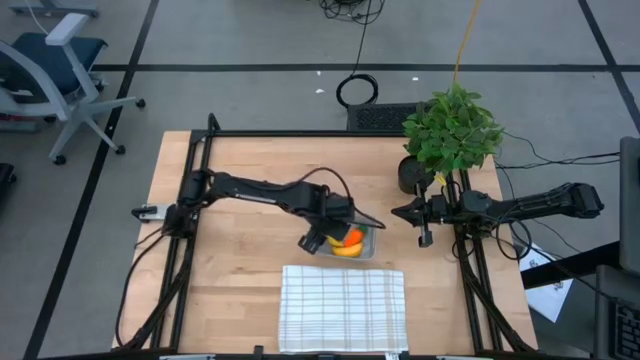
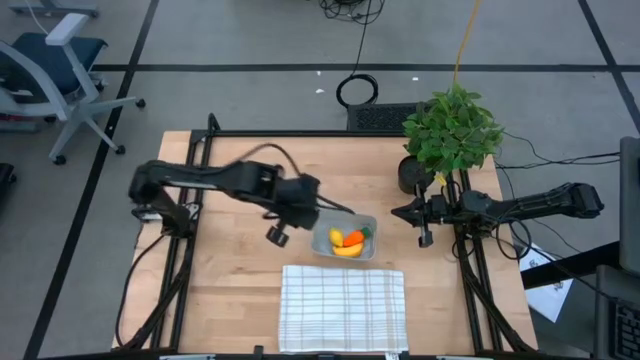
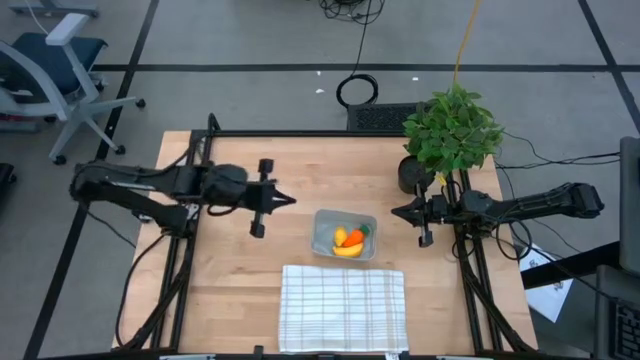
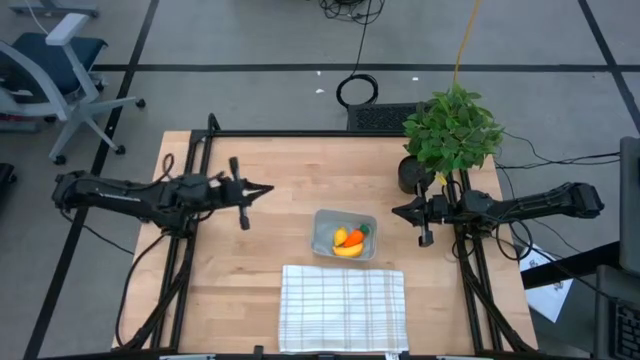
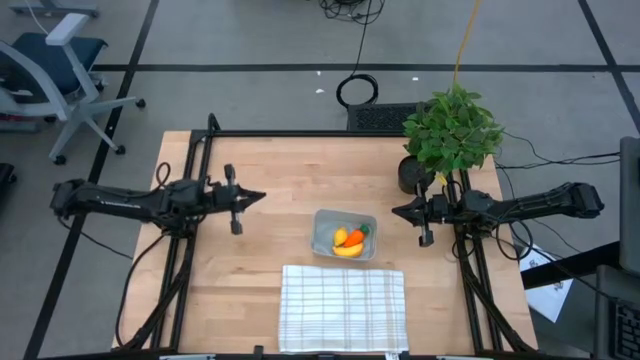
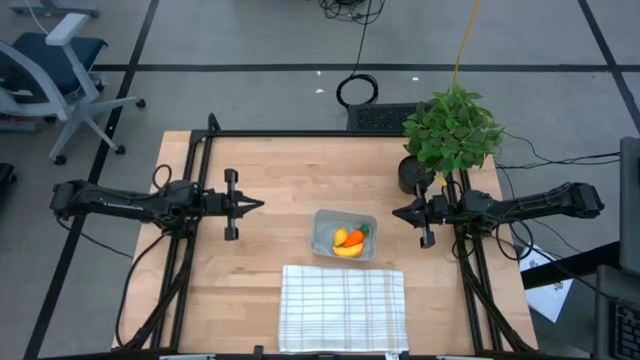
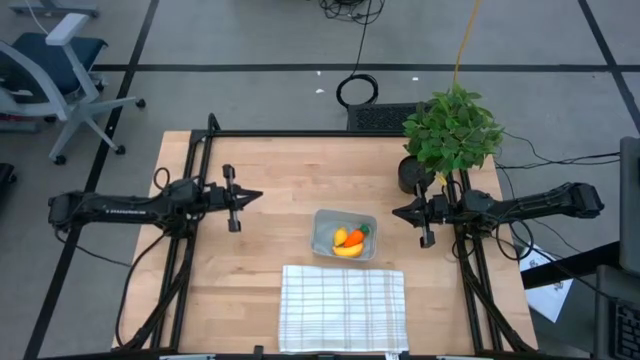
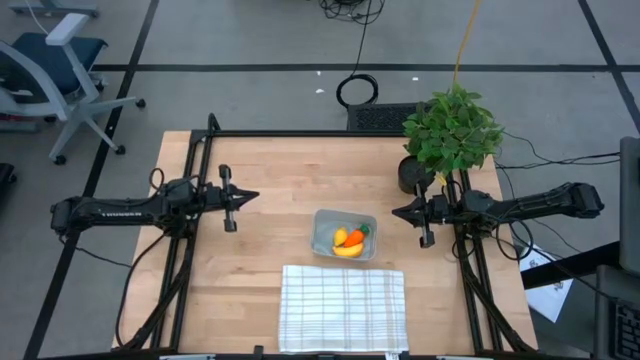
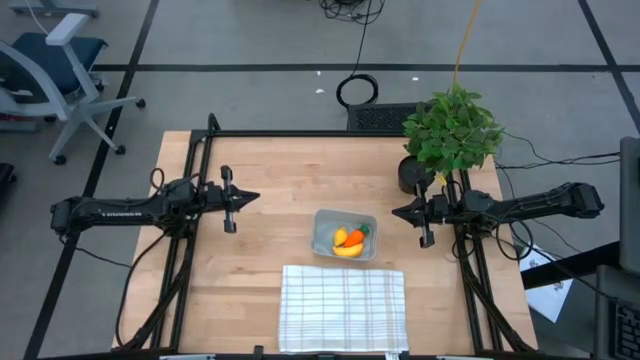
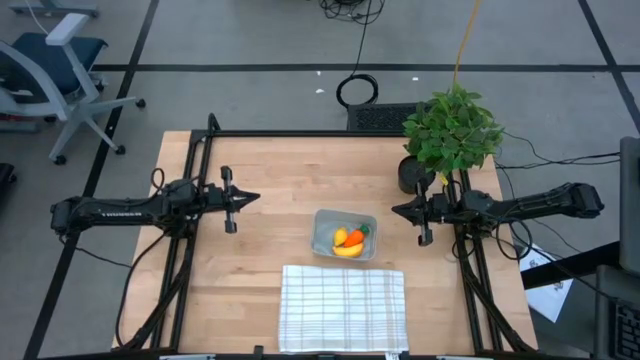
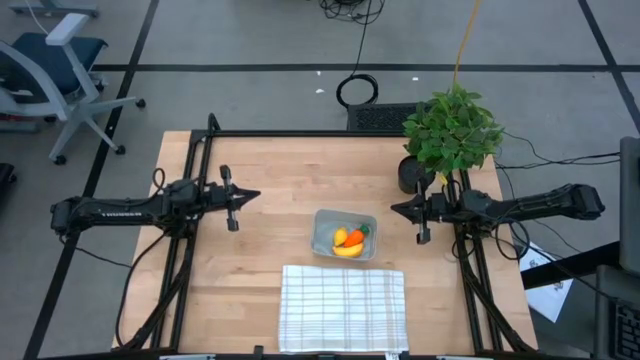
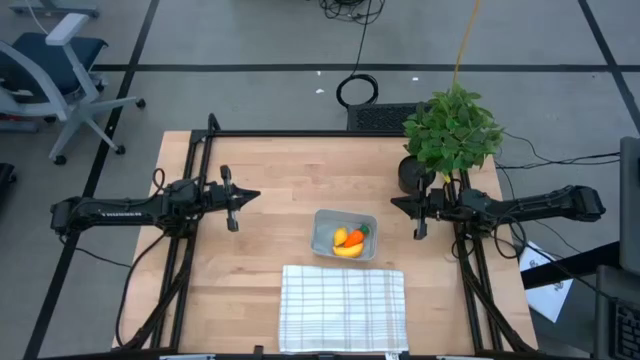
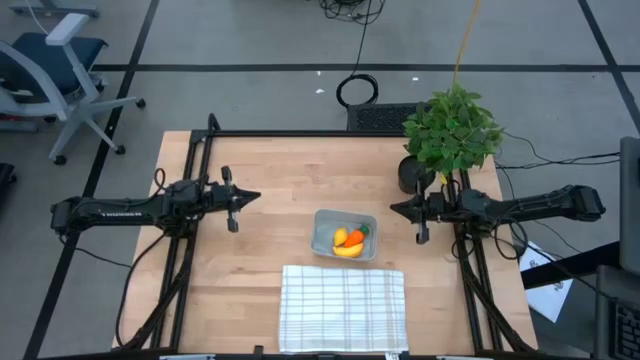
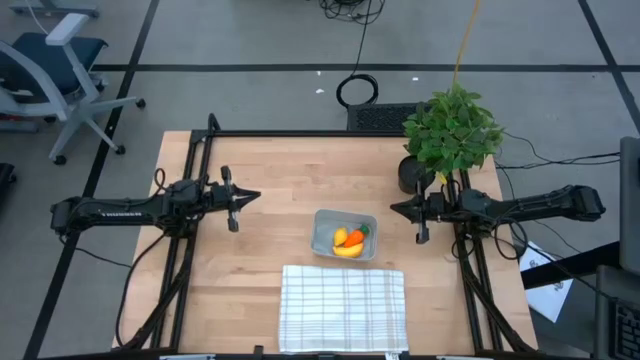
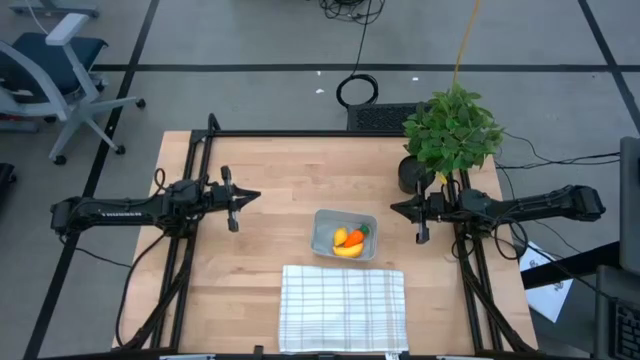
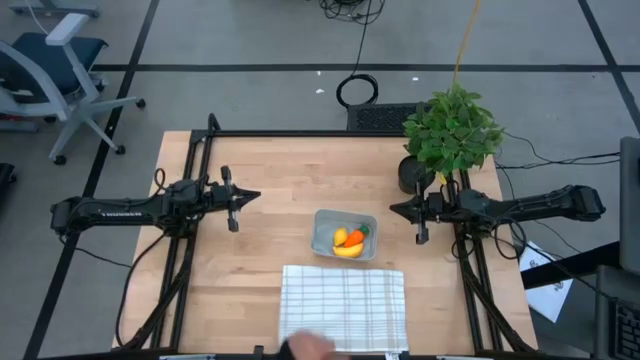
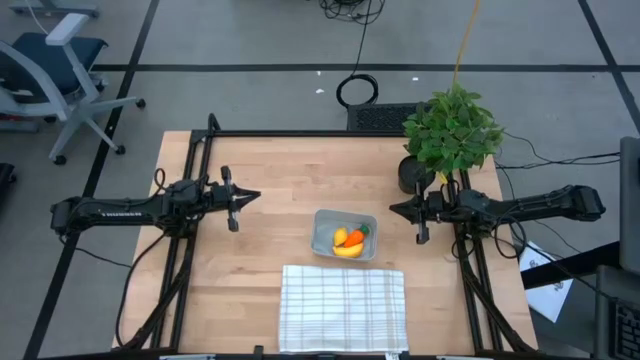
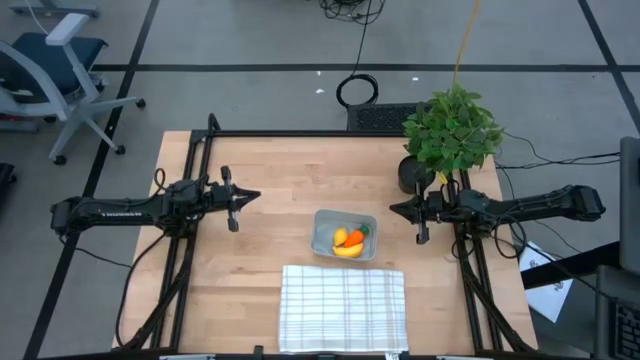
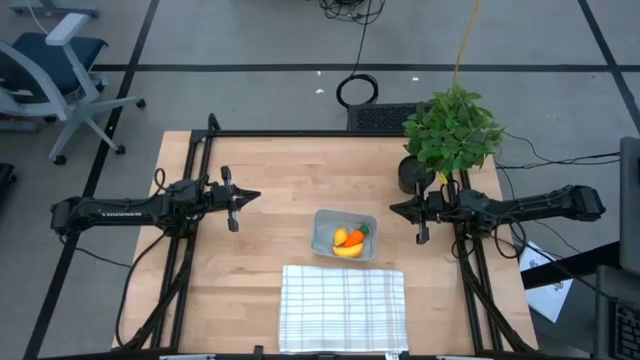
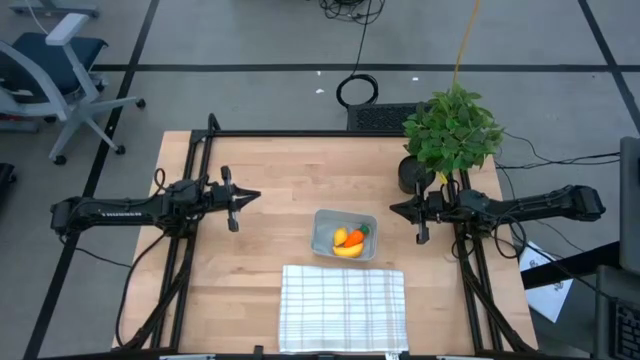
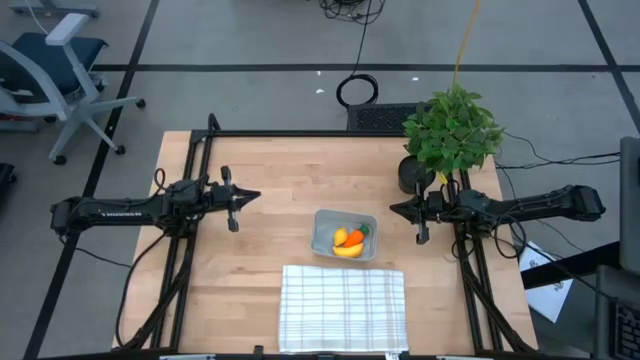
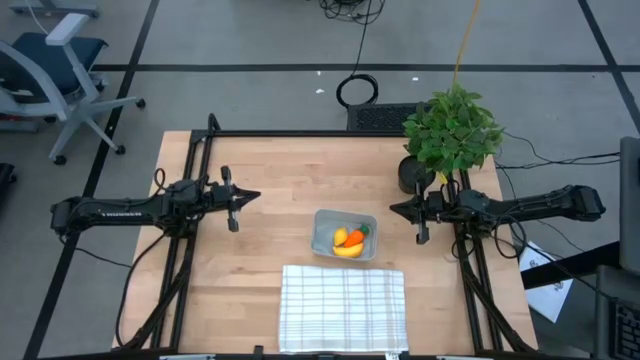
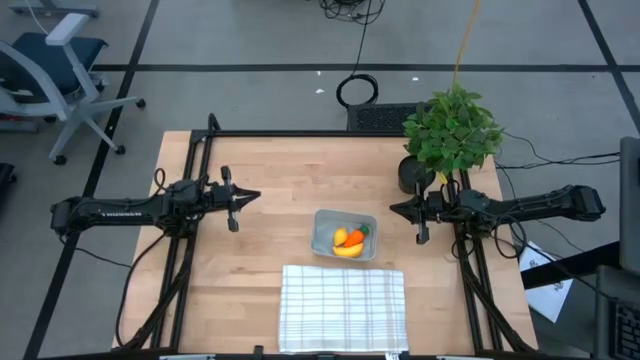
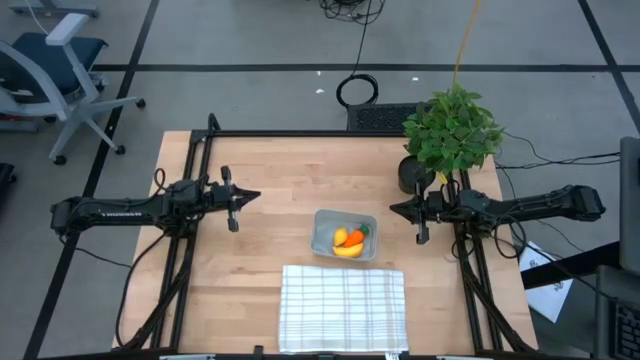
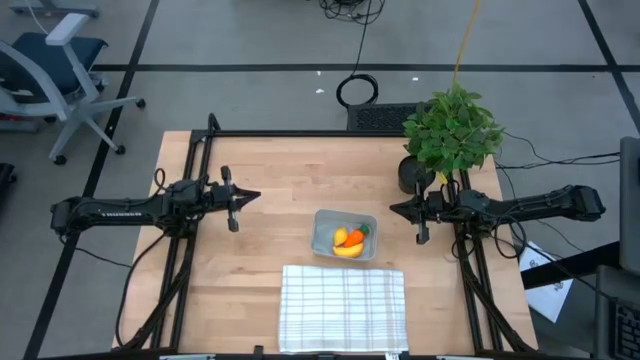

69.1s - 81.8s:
Task: Pick and placing Produce into tupperware
Return to Home Position

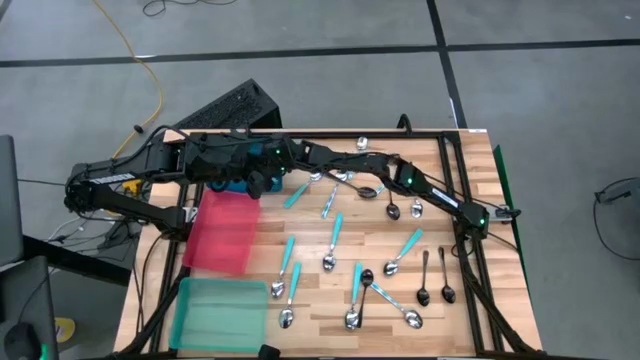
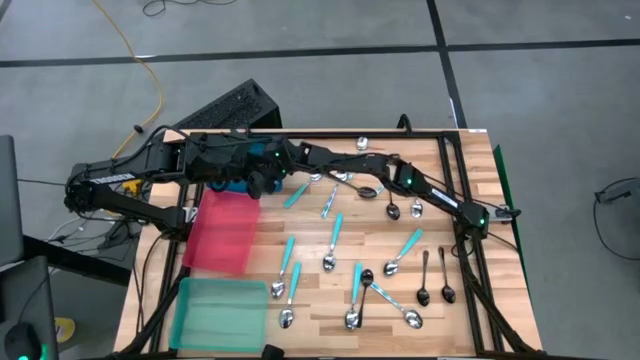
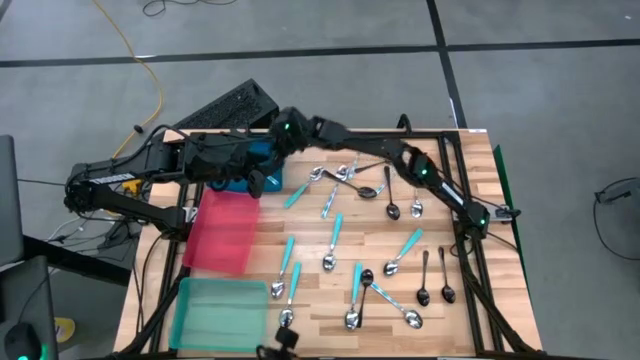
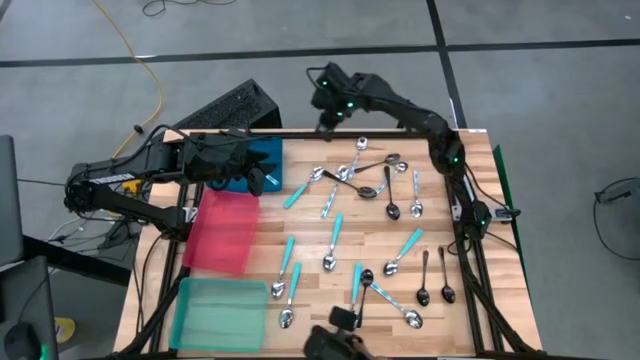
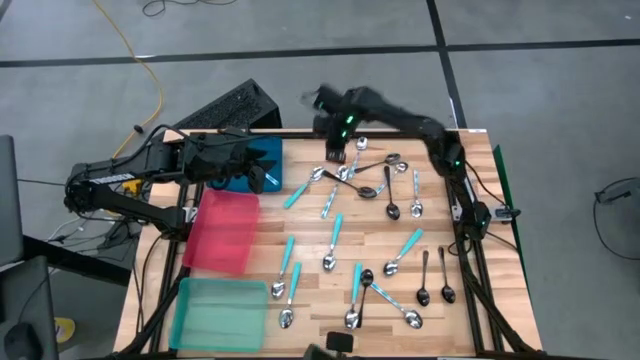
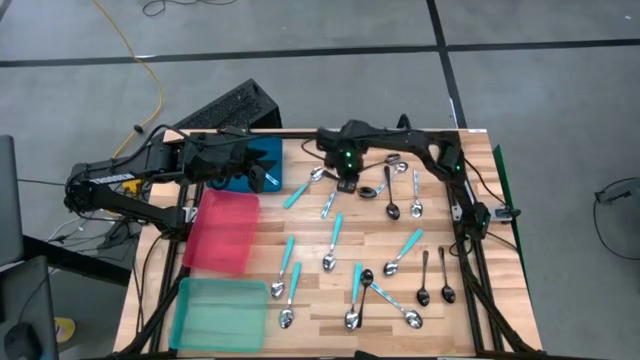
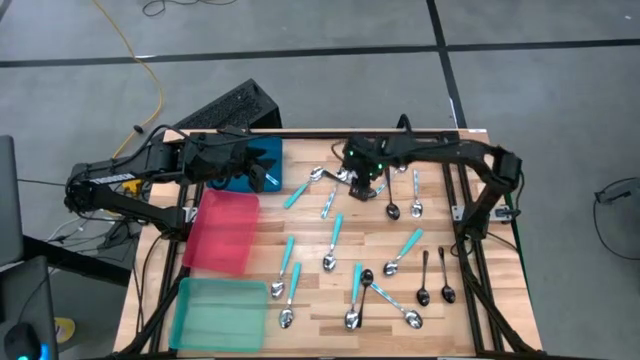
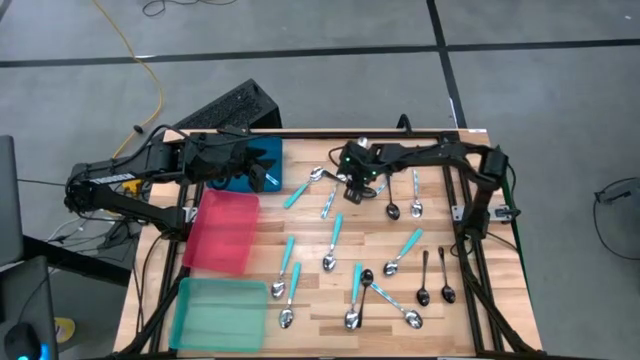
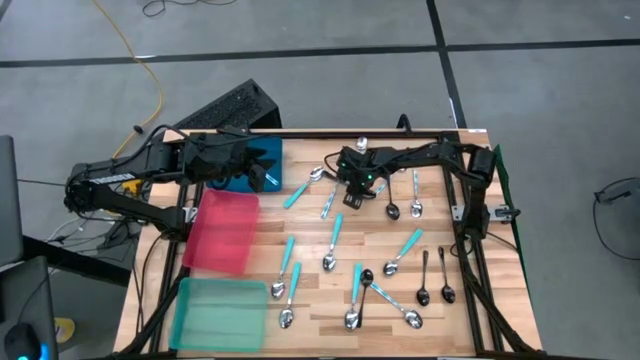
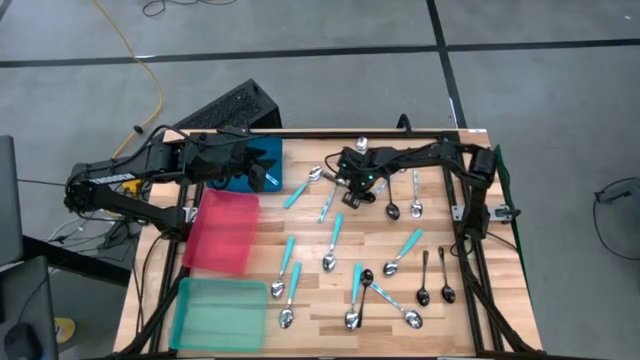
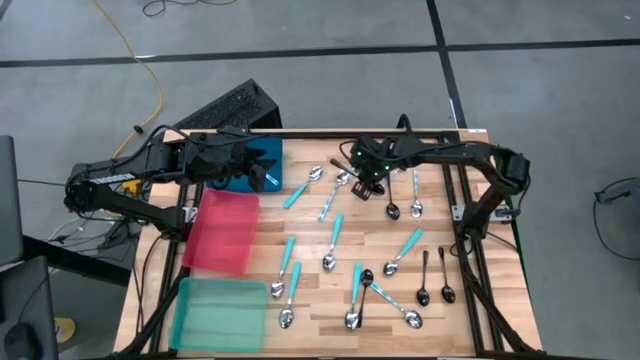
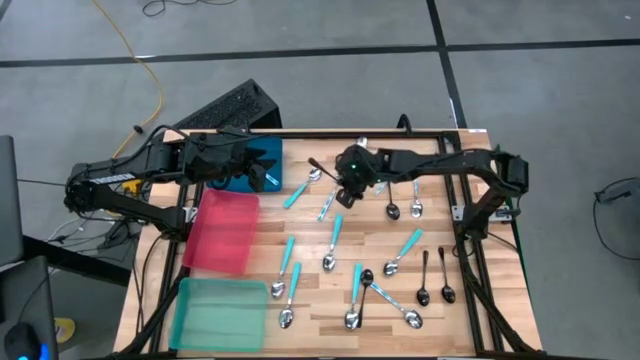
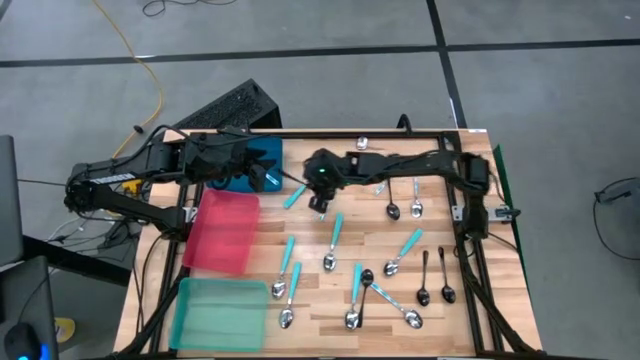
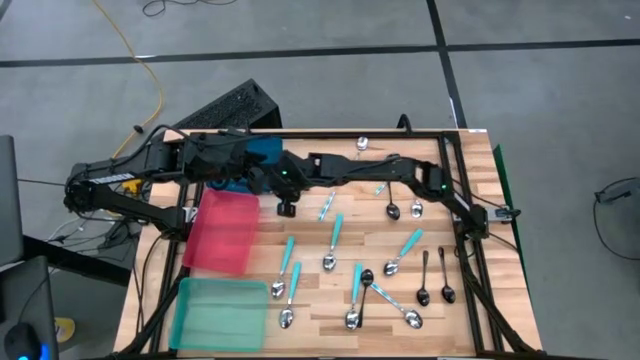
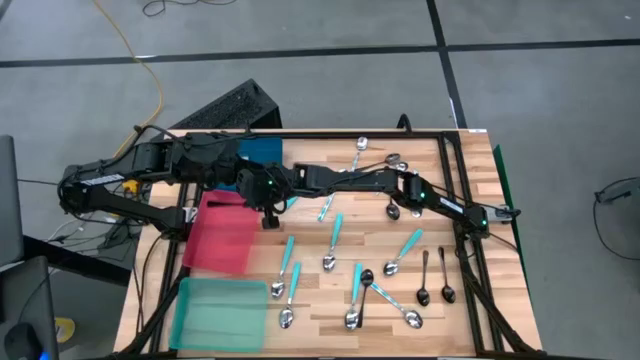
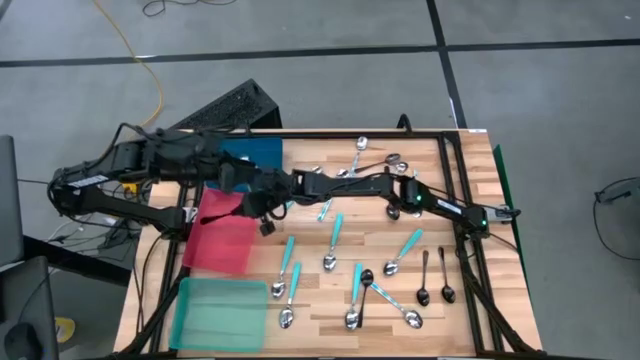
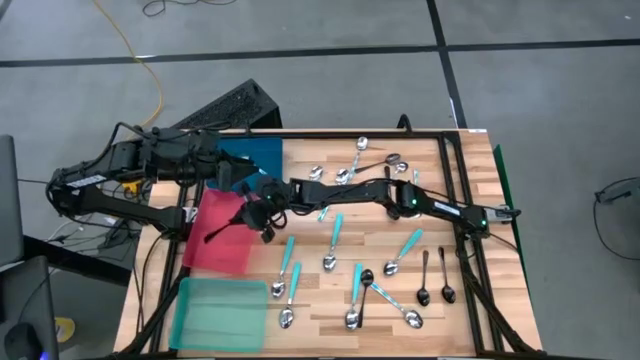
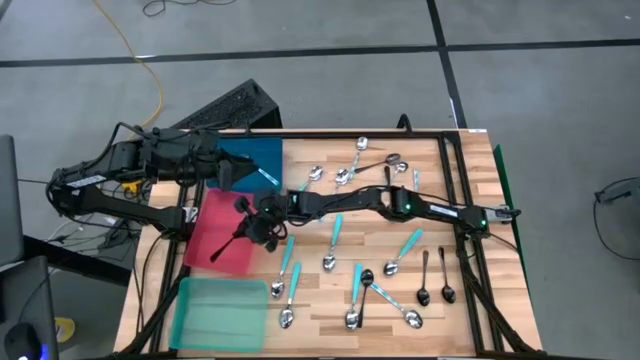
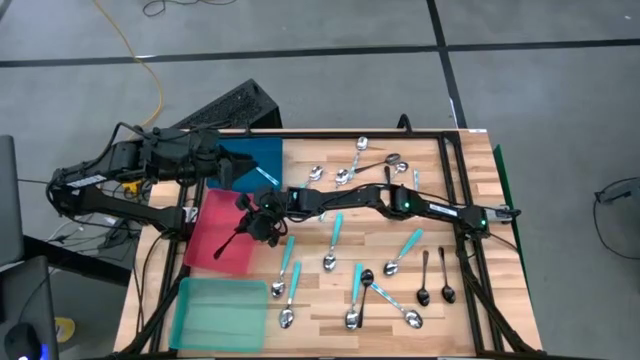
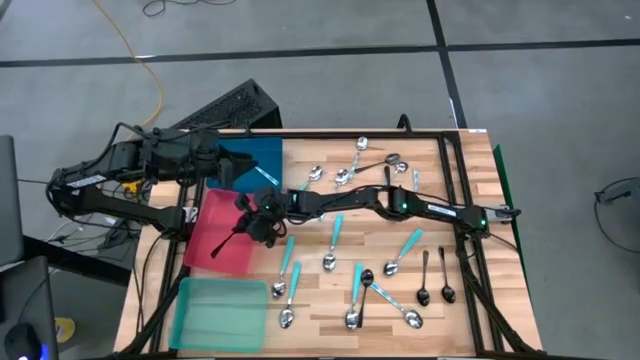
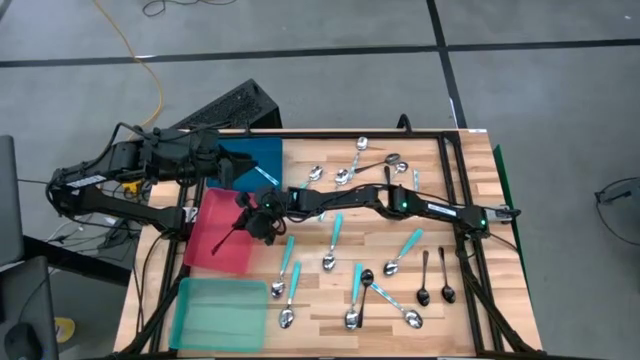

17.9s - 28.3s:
Task: Sort silverware by color (type)
Put the black spoon into the red bin
